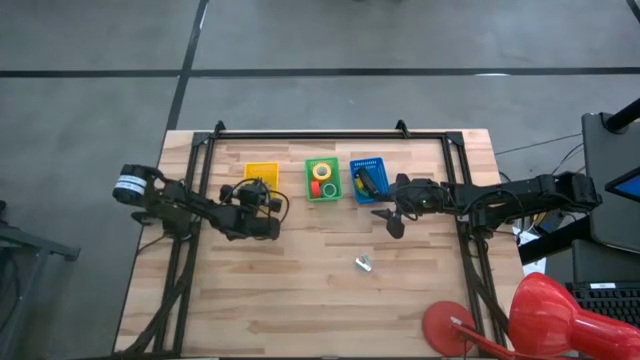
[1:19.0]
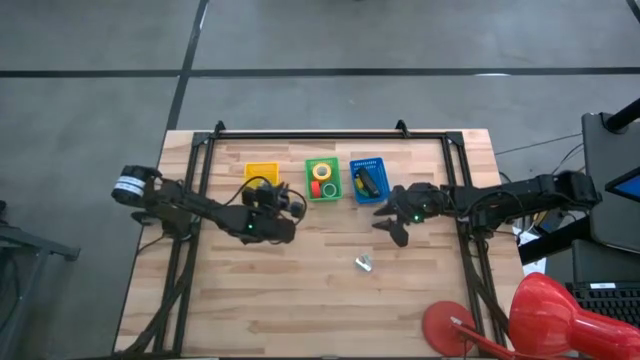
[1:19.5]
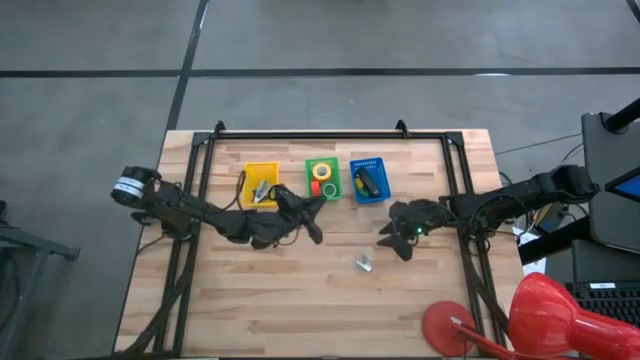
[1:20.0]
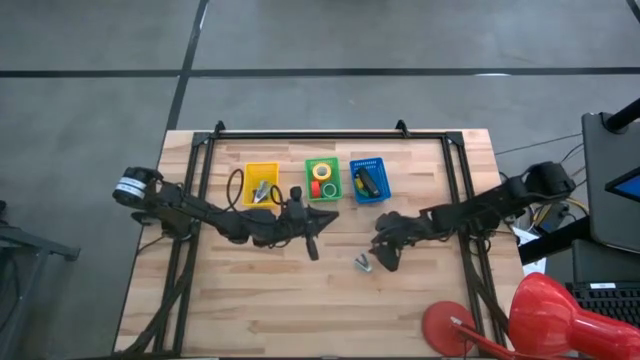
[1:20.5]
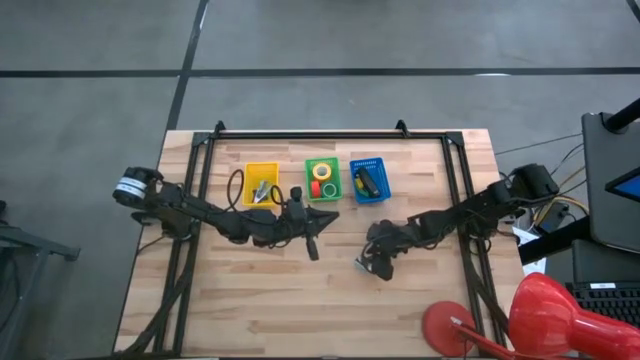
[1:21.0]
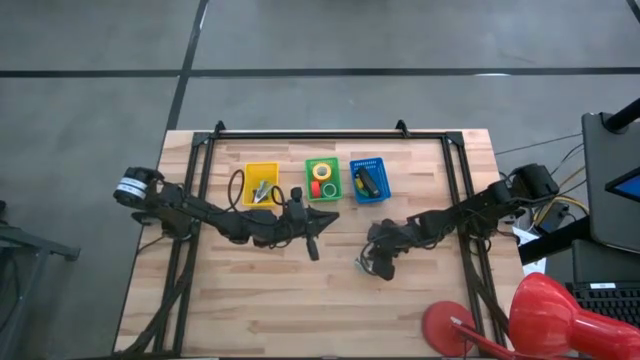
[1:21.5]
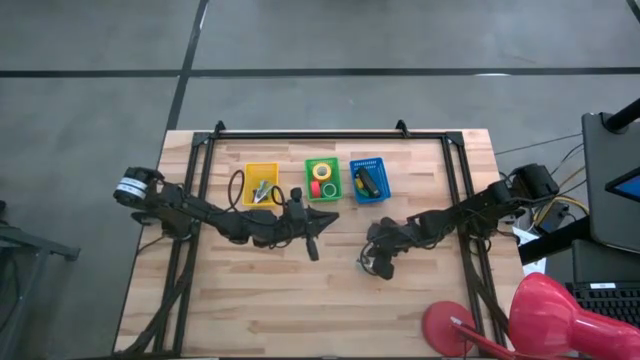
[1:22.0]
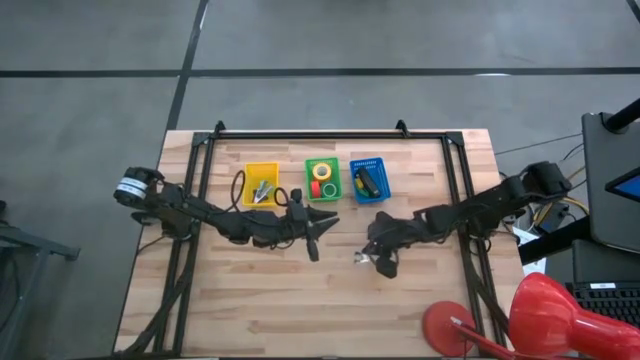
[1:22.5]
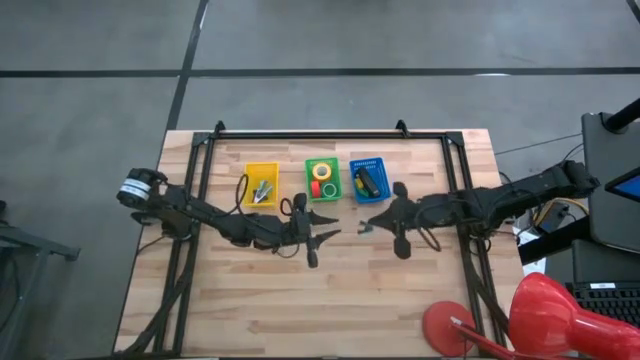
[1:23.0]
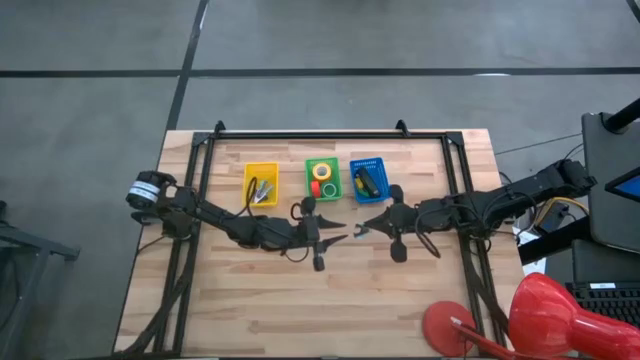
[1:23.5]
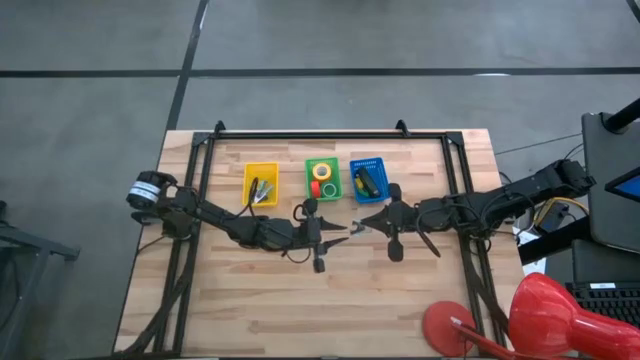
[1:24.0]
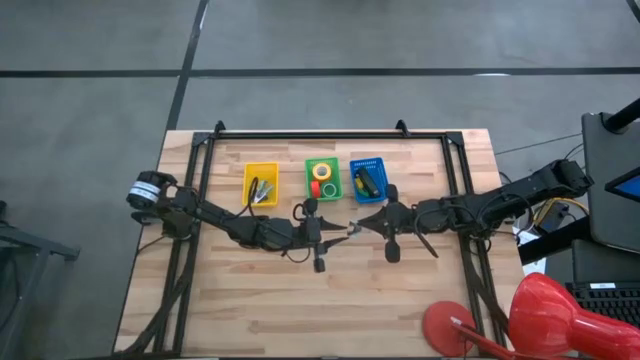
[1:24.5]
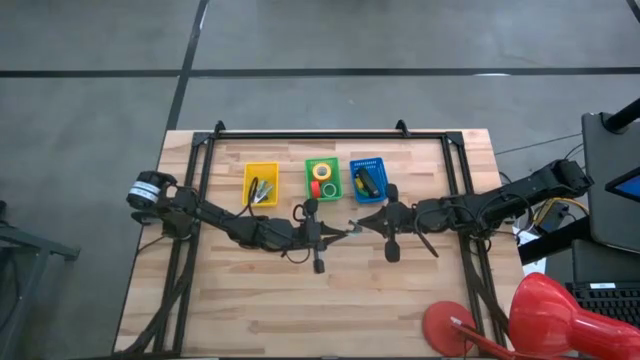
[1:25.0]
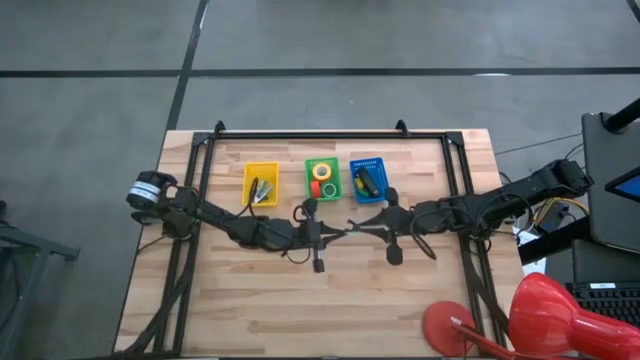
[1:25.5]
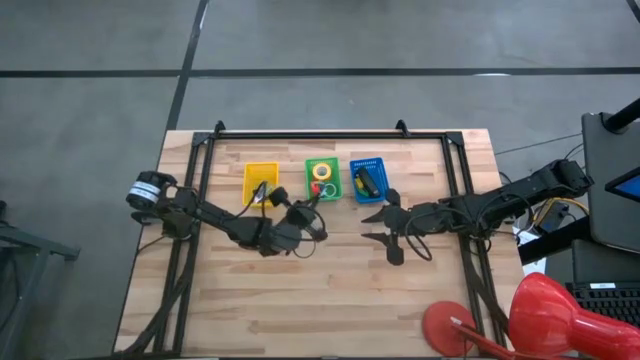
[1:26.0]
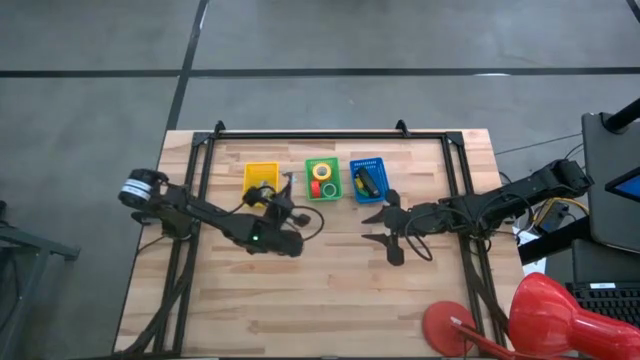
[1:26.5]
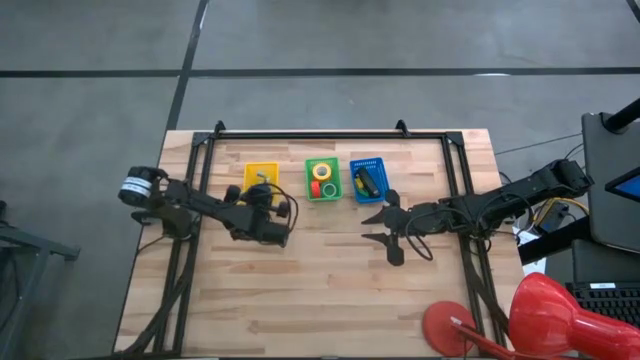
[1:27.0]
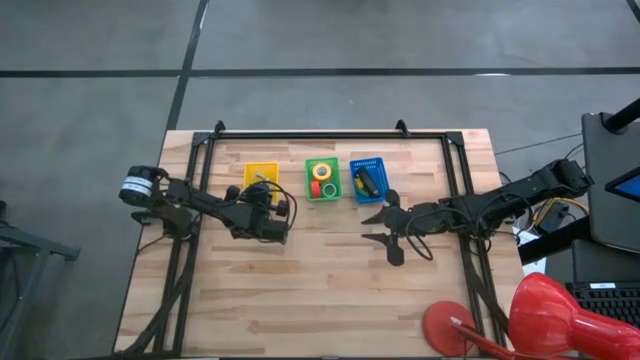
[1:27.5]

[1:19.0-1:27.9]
Task: Pick and place Stapler, Stapler remover, tape
Put the light blue staple remover into the yellow bin

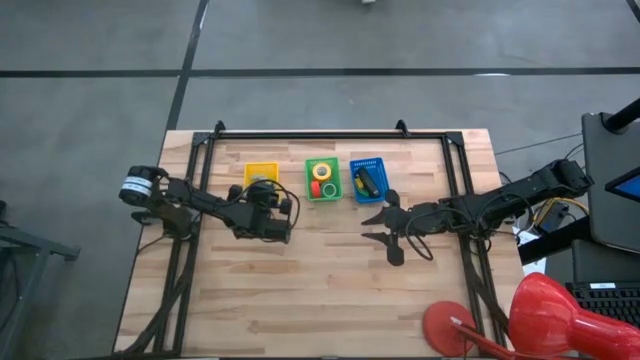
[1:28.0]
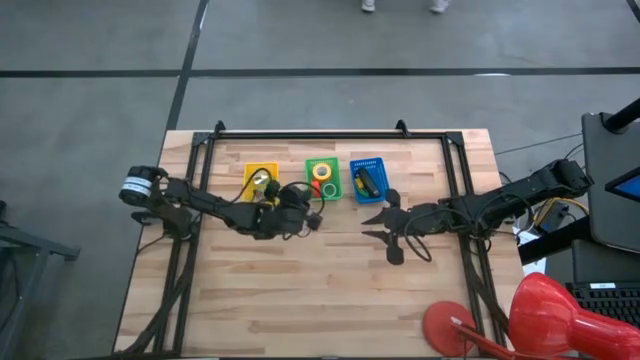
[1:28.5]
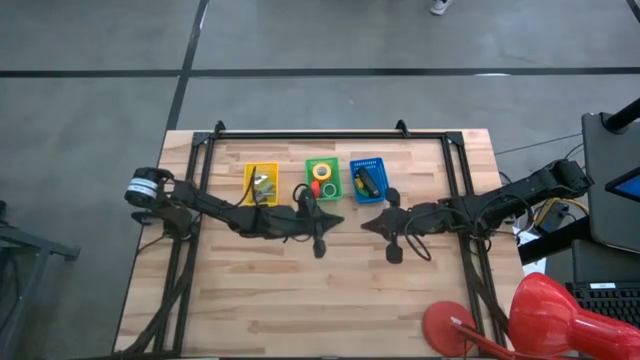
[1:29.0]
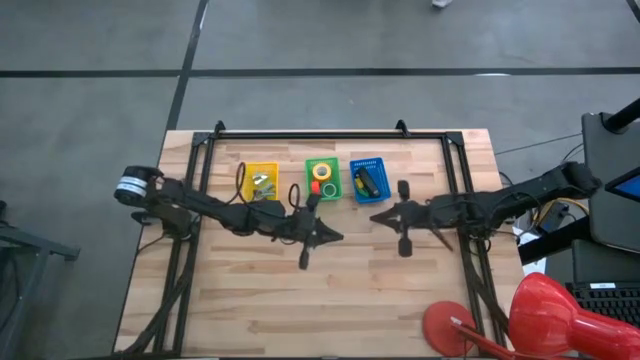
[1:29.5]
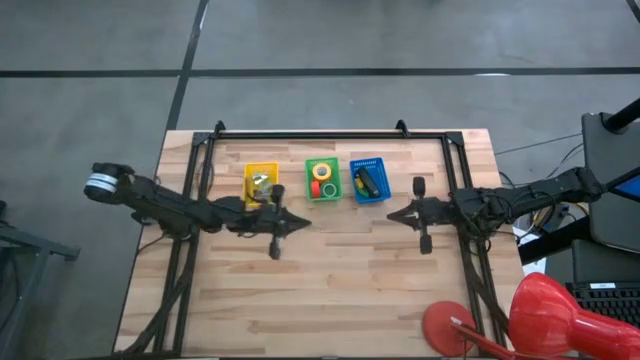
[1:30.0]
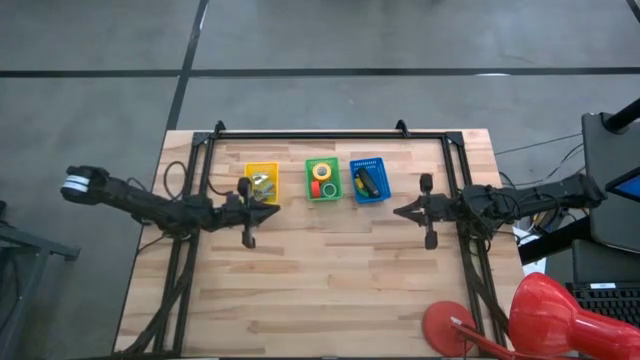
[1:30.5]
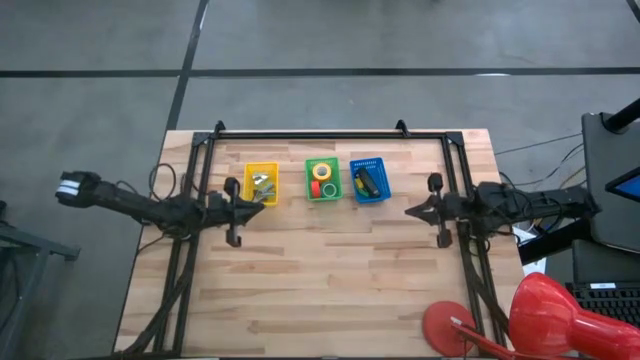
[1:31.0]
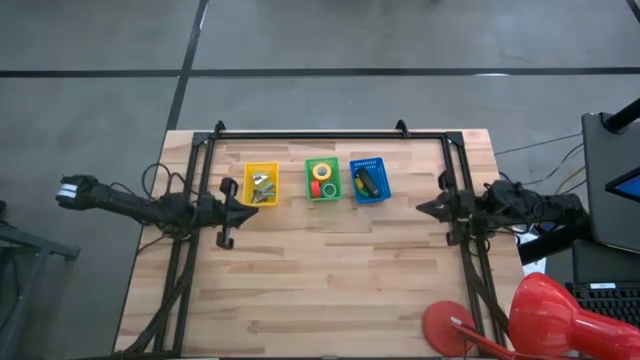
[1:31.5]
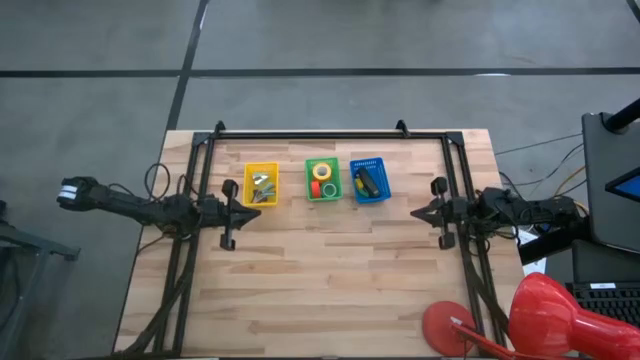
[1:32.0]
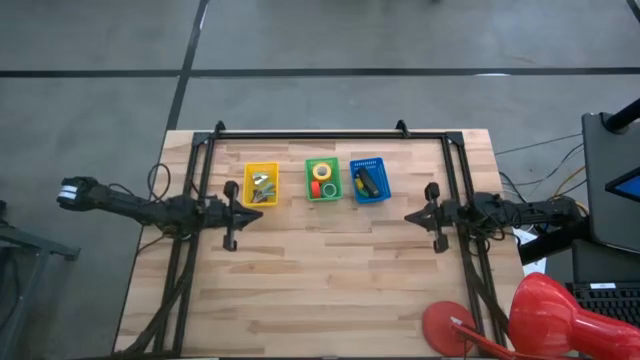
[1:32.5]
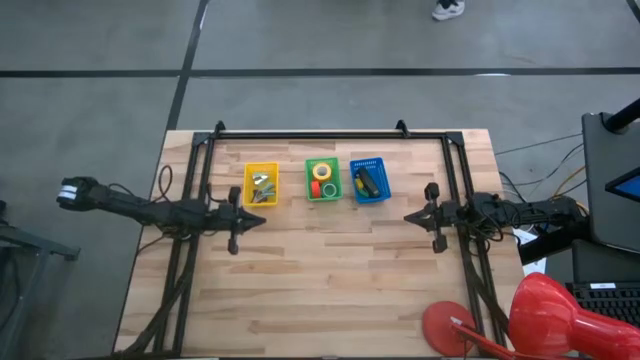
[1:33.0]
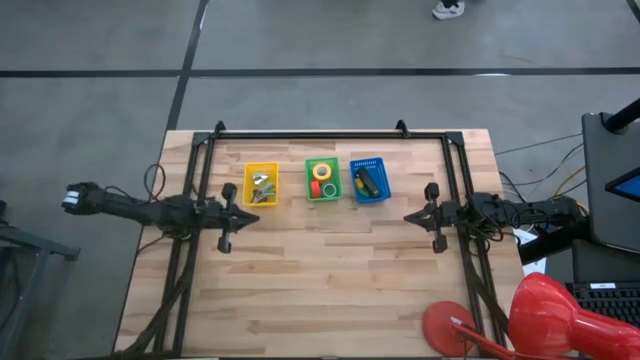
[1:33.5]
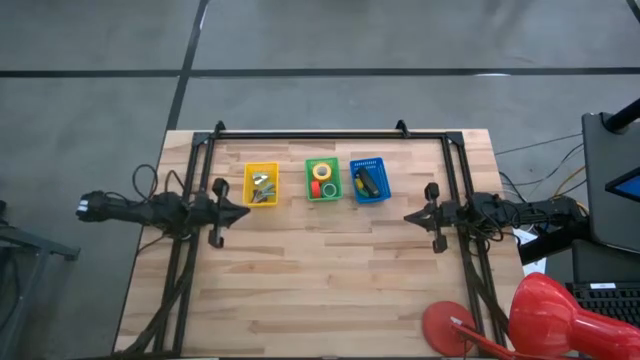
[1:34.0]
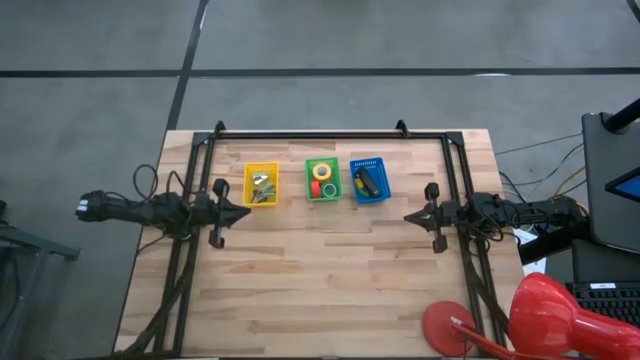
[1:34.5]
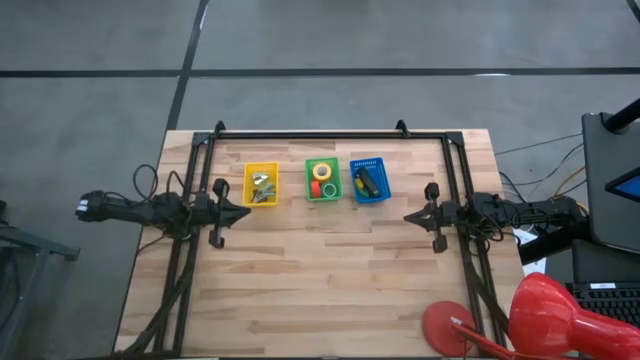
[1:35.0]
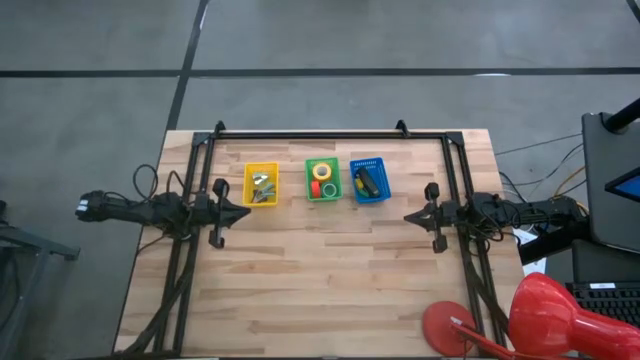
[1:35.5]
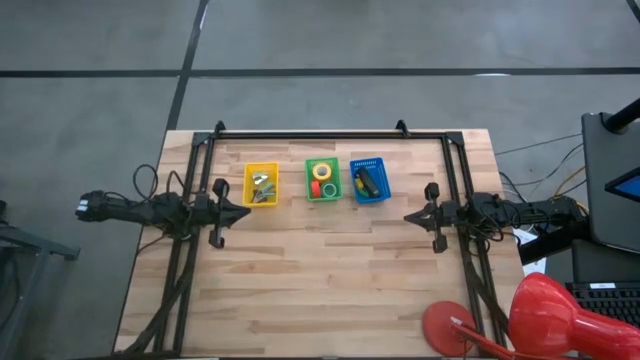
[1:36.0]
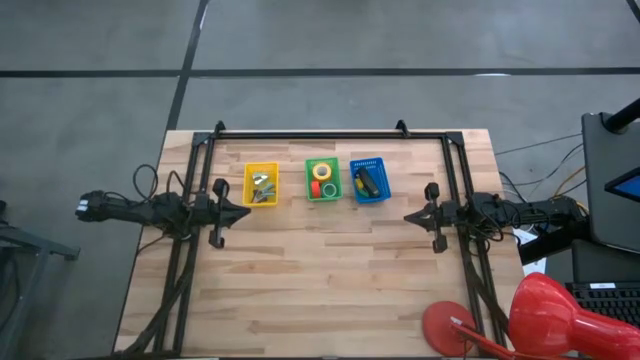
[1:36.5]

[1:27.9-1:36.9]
Return to Home Position

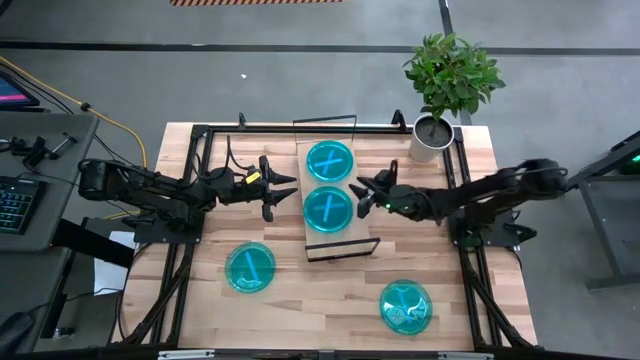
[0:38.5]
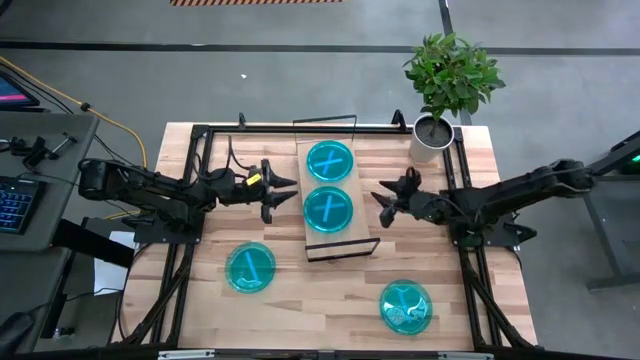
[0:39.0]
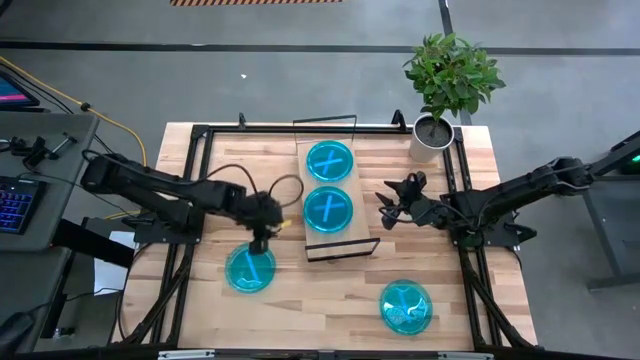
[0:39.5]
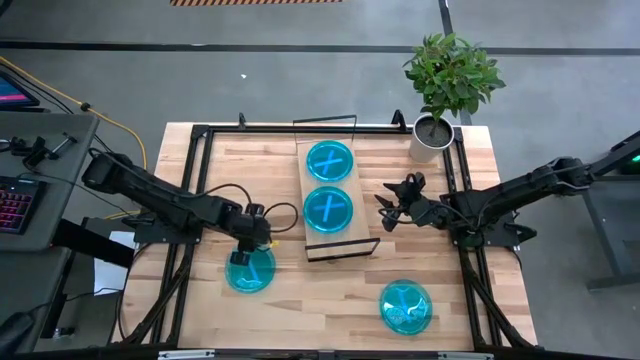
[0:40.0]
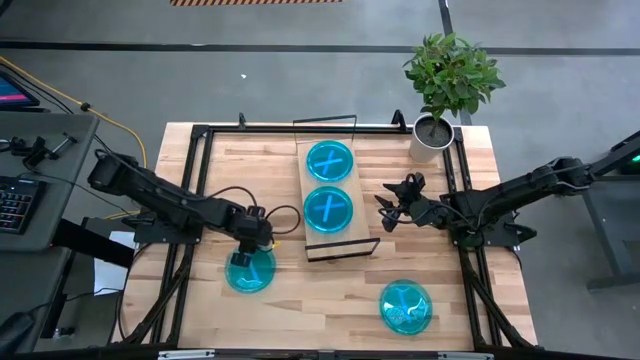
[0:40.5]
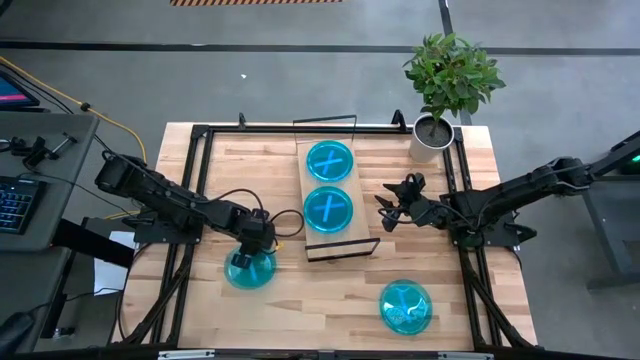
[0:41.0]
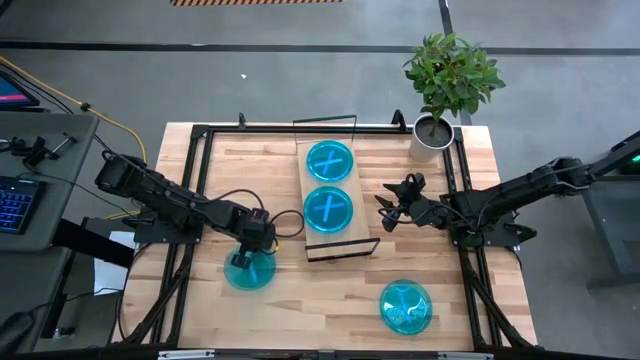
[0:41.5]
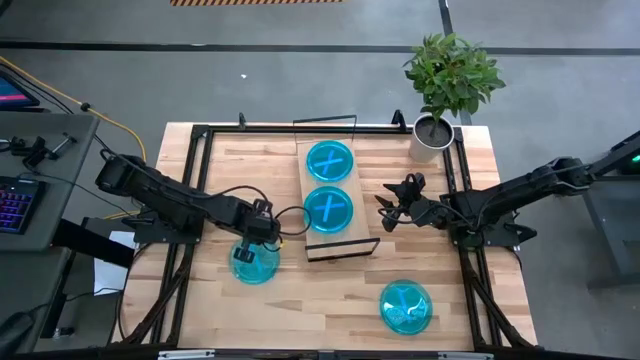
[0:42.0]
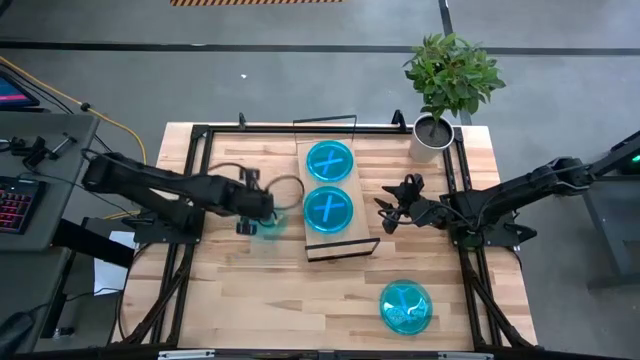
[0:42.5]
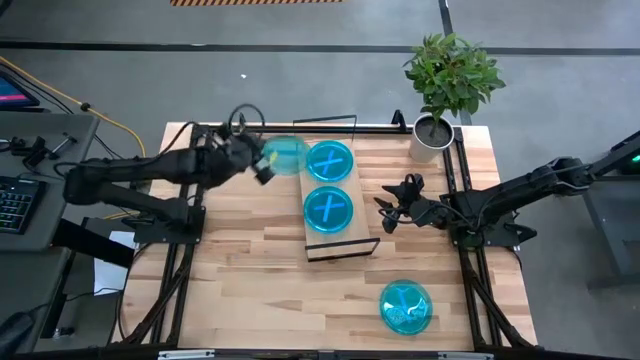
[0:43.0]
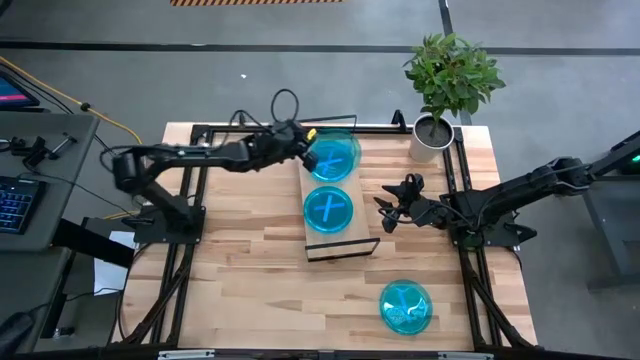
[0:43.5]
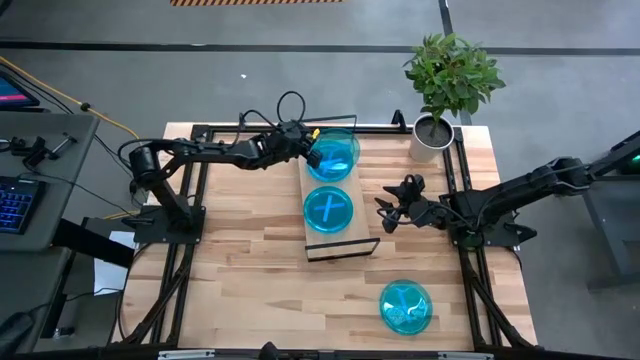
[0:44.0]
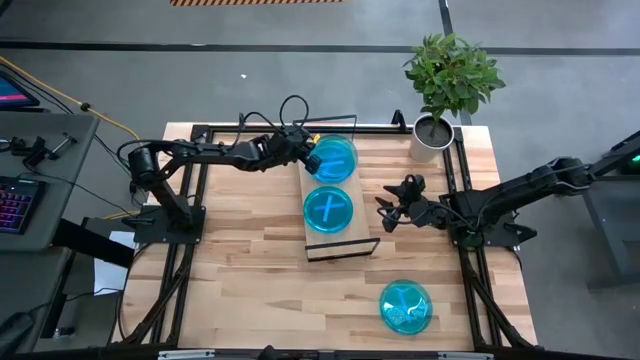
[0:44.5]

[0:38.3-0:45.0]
Task: Place and stack plates onto a shelf
Stack the blue plate on top of the blue plate on the shelf
